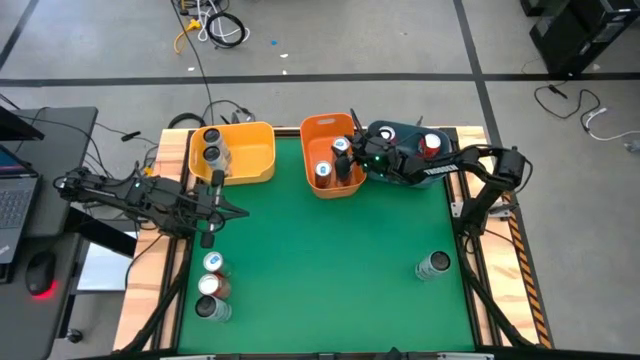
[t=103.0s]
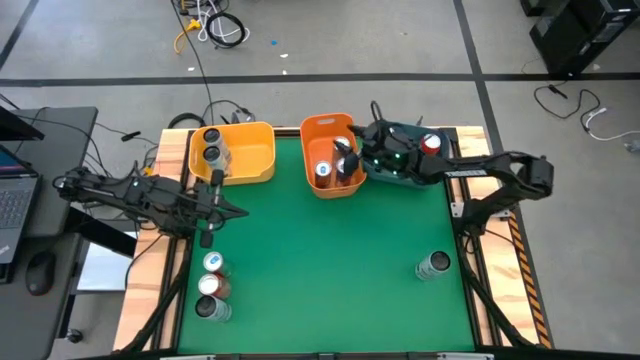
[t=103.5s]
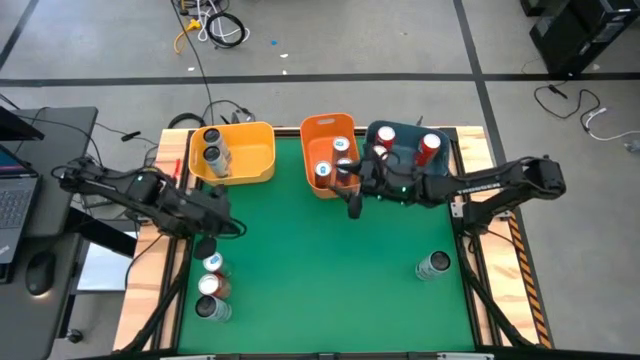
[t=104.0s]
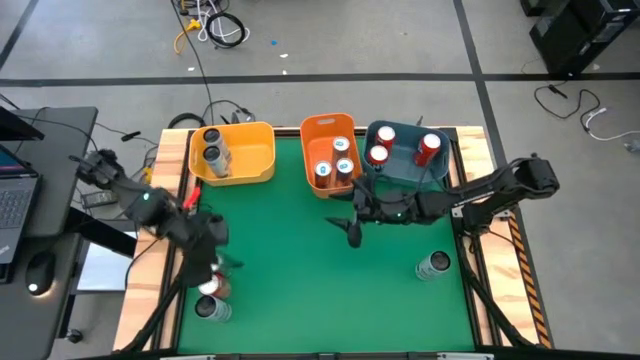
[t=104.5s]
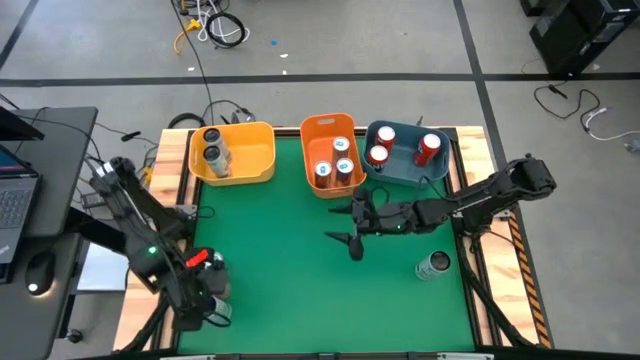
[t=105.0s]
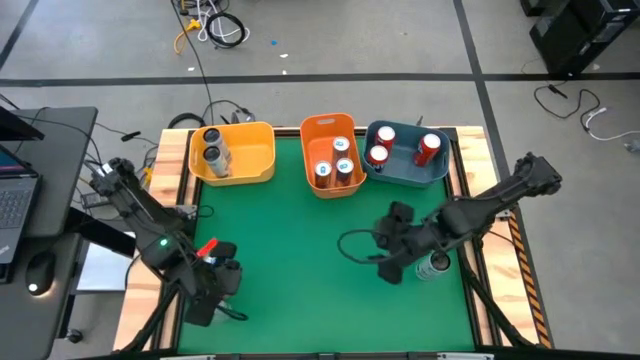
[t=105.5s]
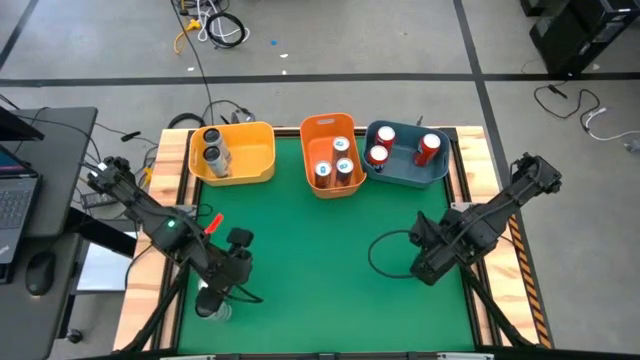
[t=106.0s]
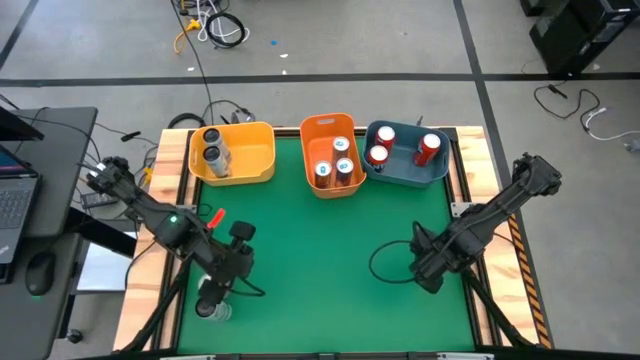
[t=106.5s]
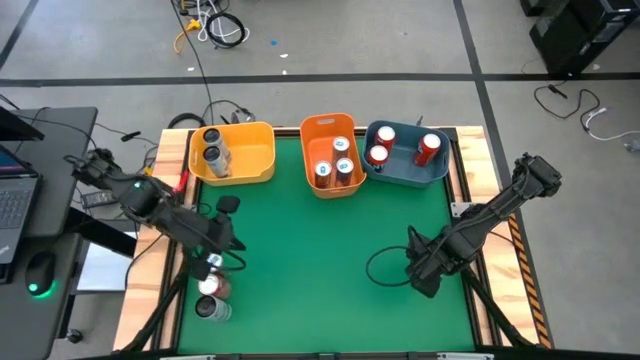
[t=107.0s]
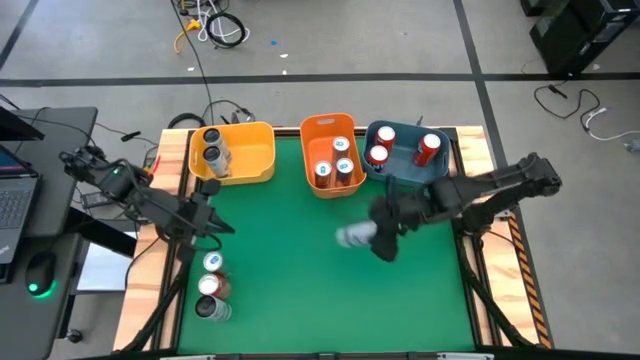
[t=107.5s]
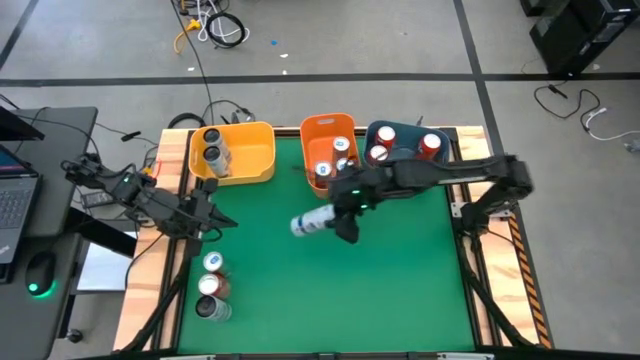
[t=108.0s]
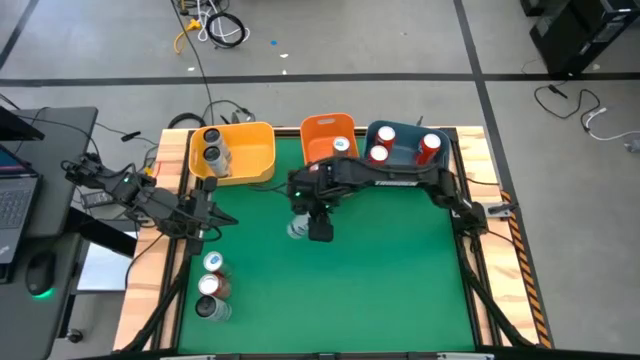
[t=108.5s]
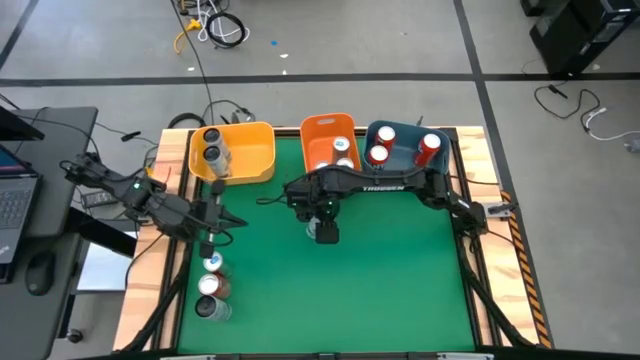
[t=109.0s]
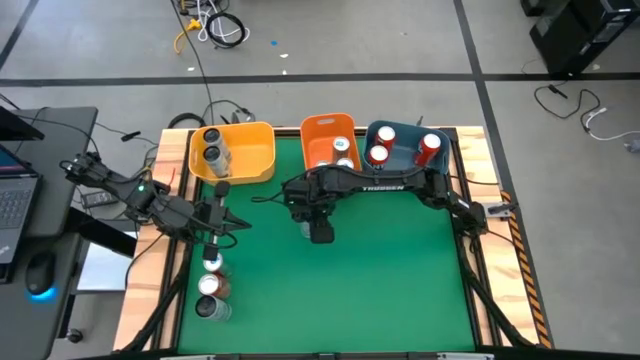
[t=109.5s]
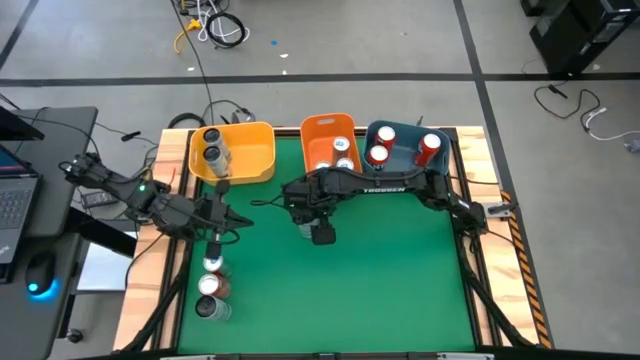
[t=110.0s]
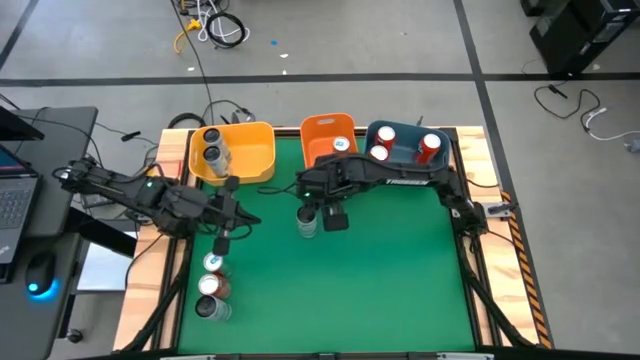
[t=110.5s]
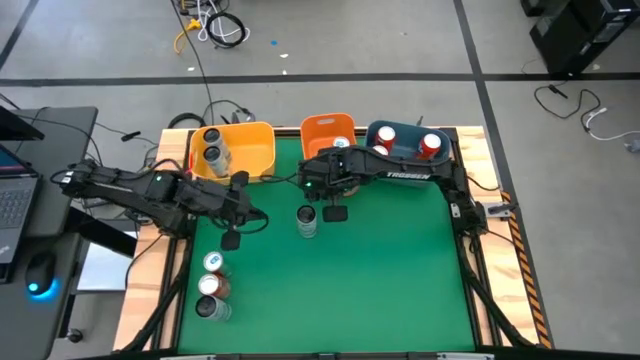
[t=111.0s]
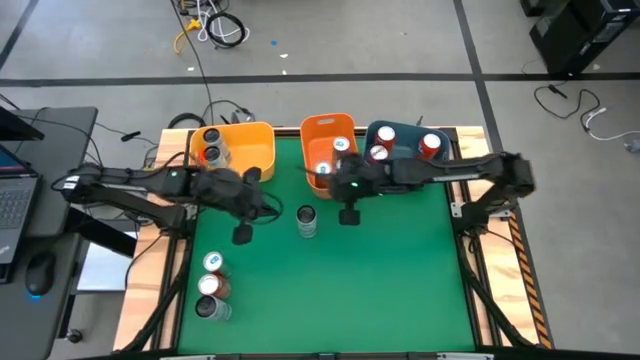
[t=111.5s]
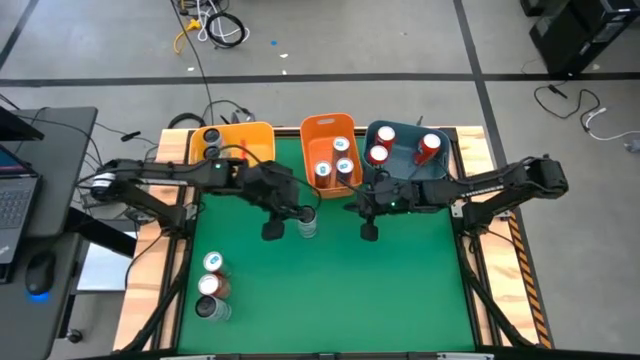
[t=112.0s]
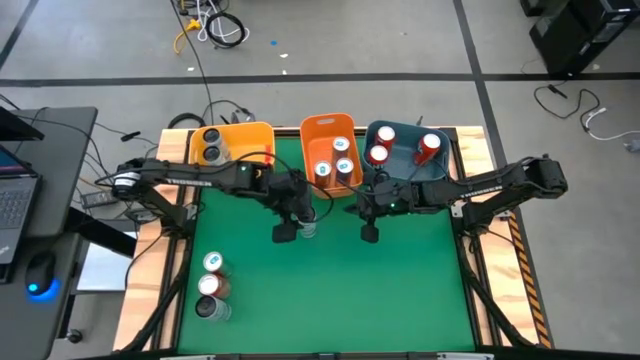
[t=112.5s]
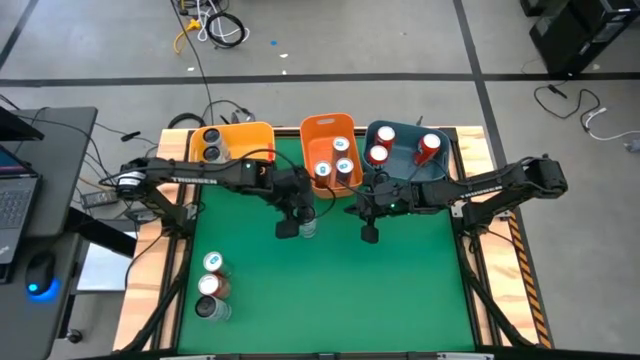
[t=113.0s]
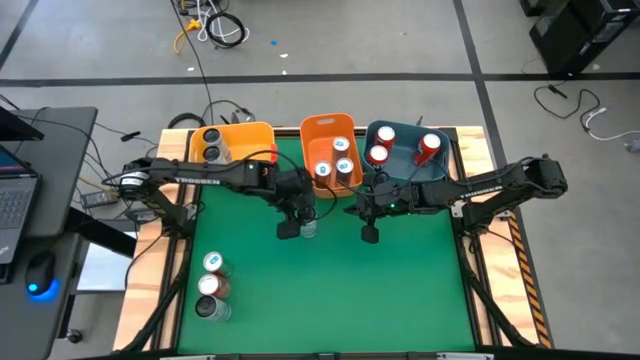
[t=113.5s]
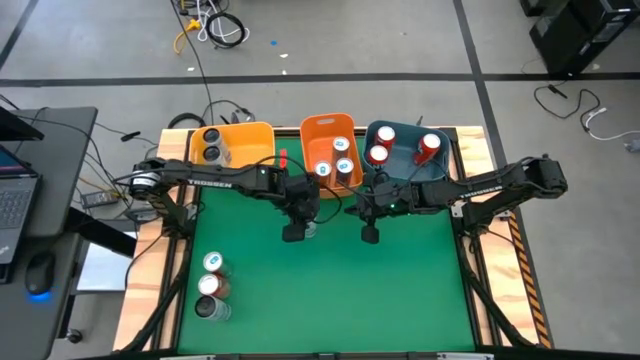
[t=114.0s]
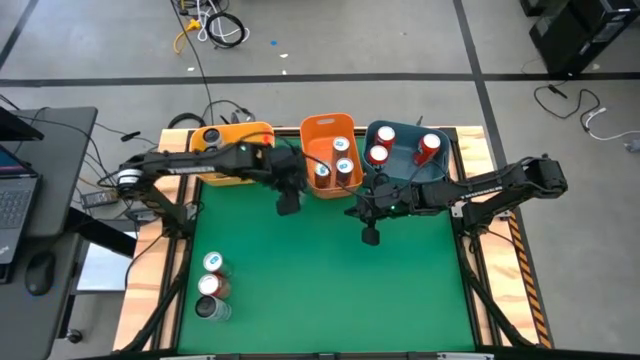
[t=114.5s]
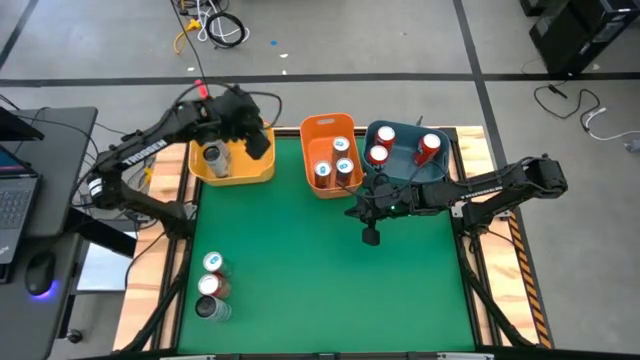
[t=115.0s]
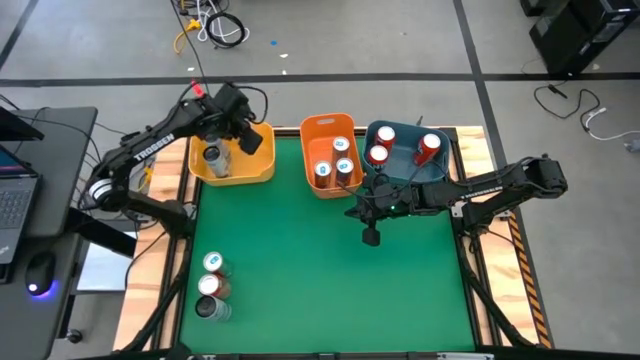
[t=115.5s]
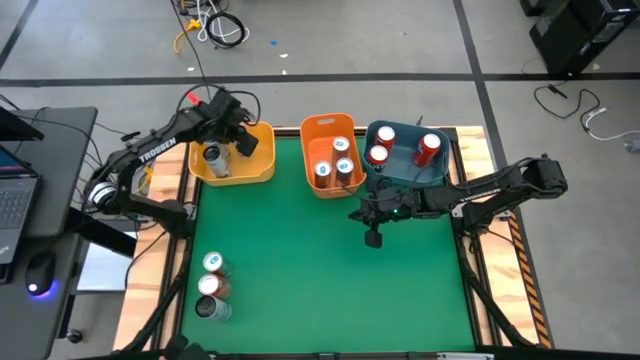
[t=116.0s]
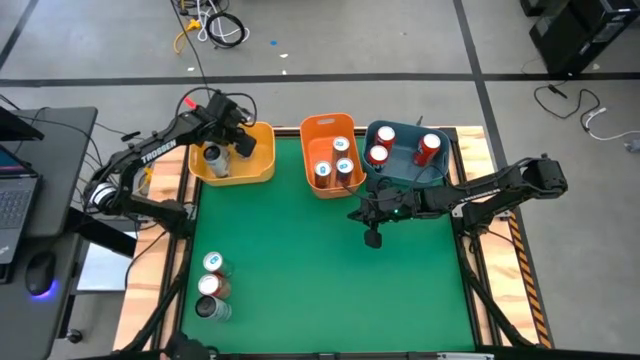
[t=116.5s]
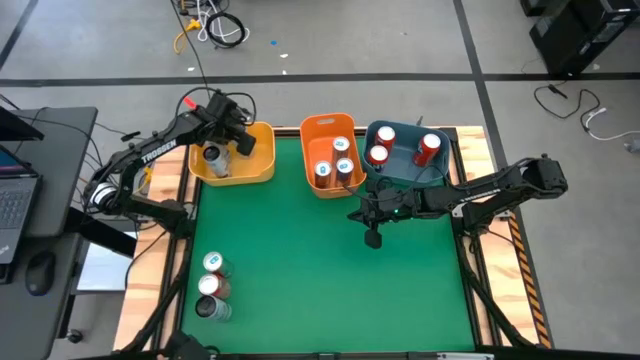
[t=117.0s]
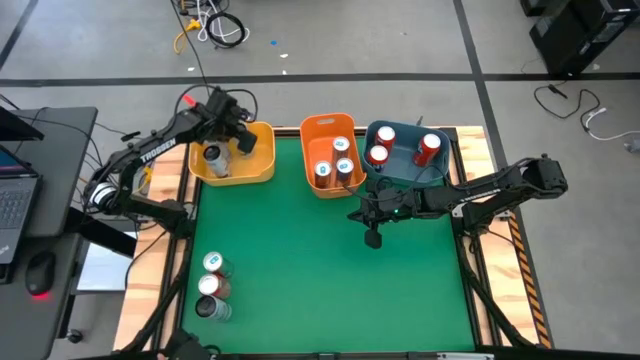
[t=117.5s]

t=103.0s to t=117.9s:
Task: Sort soda cans
Put the white blue soda can into the yellow bin

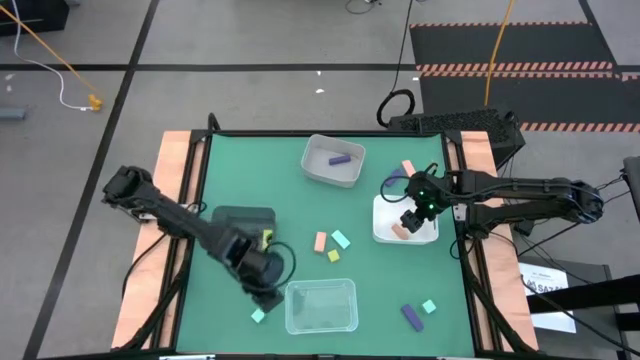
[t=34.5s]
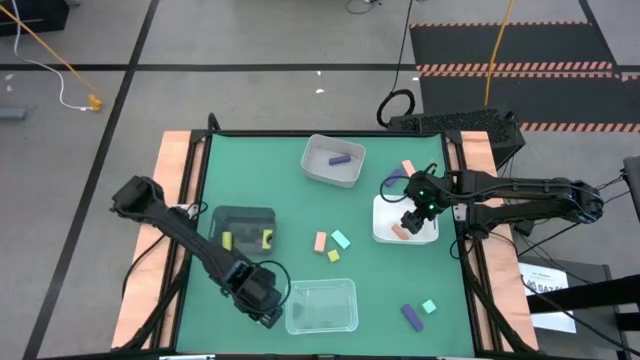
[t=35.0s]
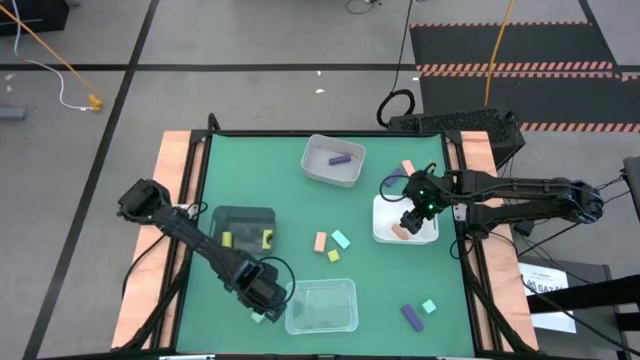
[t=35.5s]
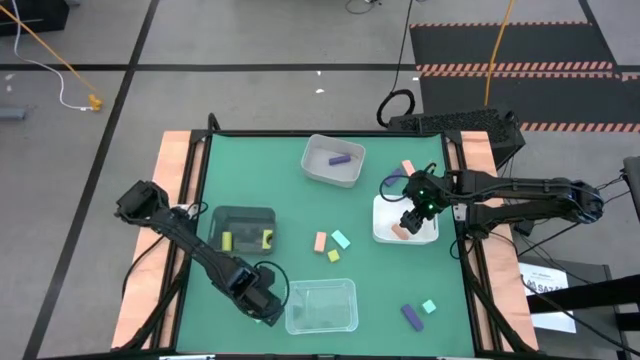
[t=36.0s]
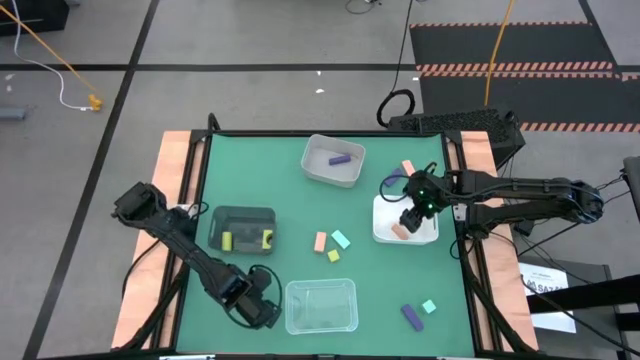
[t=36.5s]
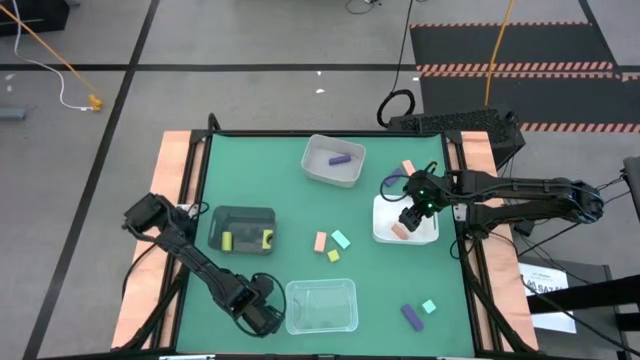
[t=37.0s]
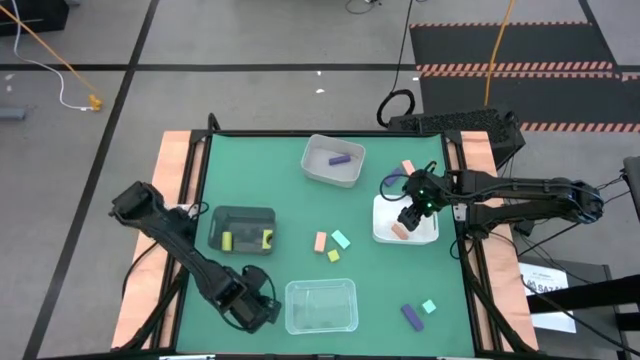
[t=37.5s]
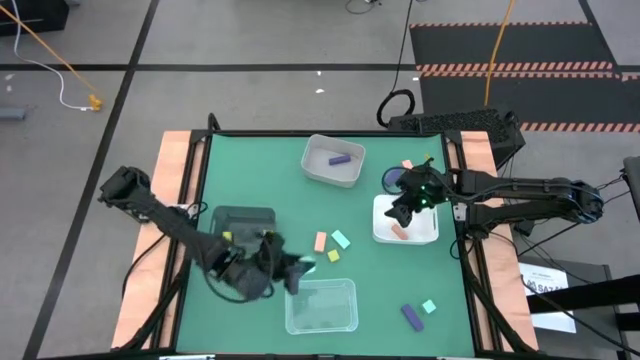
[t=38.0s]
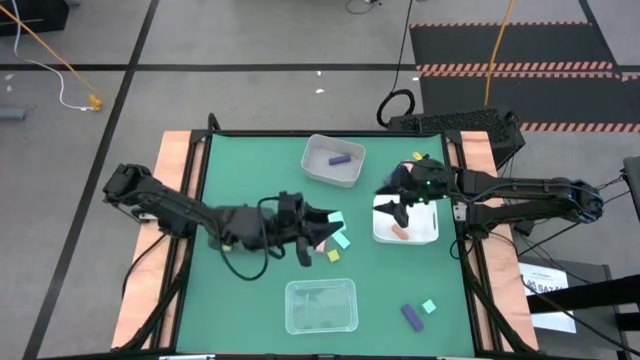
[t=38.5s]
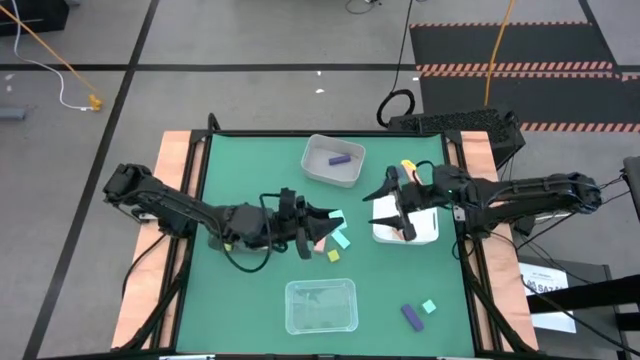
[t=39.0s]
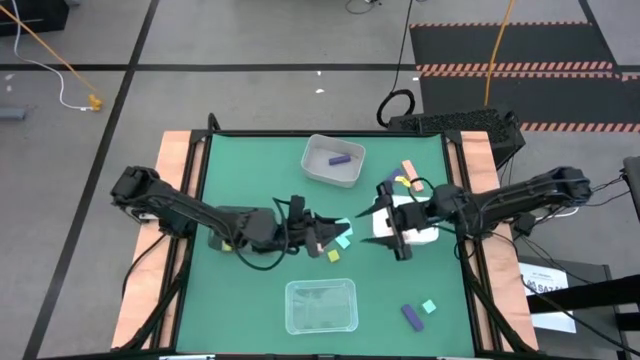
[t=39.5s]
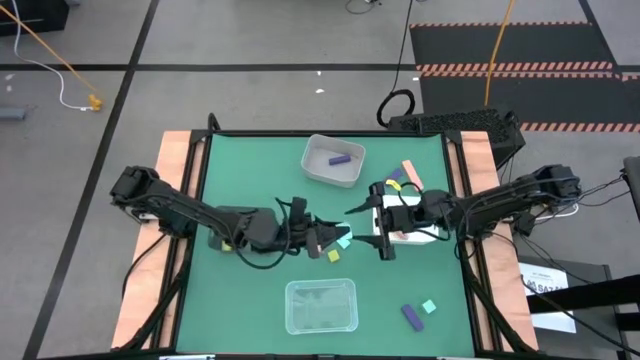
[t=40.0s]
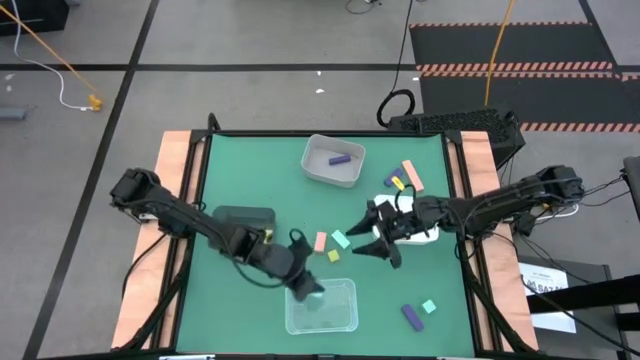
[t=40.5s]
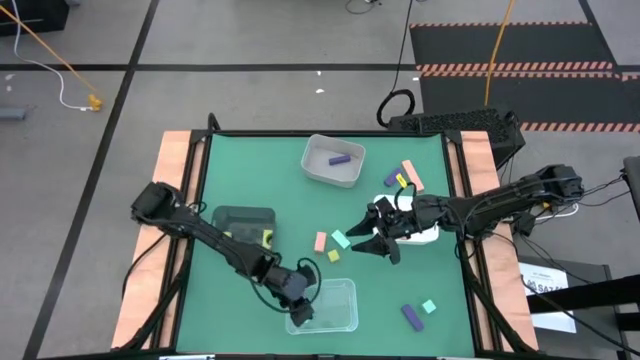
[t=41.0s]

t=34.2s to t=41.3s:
Task: Sort & place blocks by color
Put the left light blue block into the transparent bin
